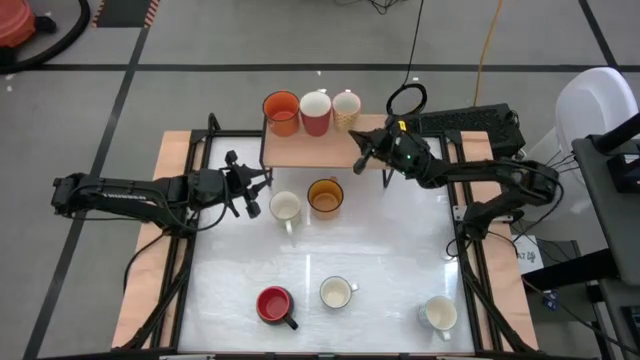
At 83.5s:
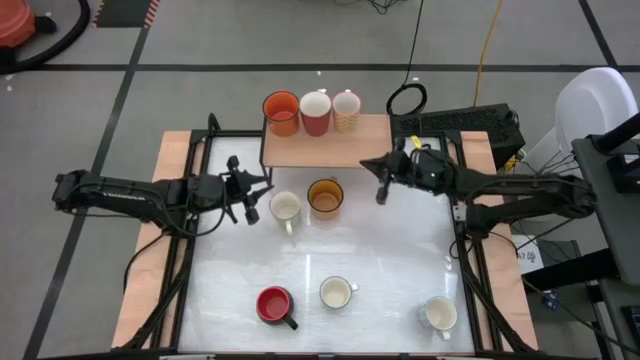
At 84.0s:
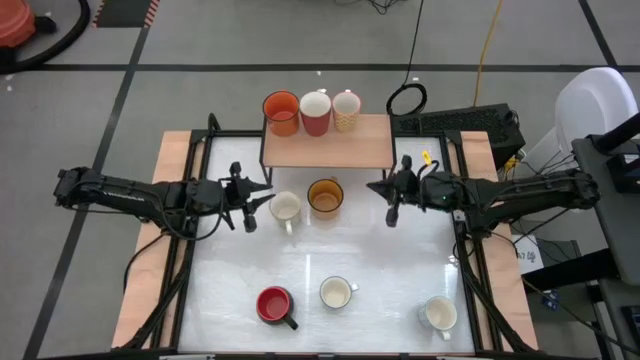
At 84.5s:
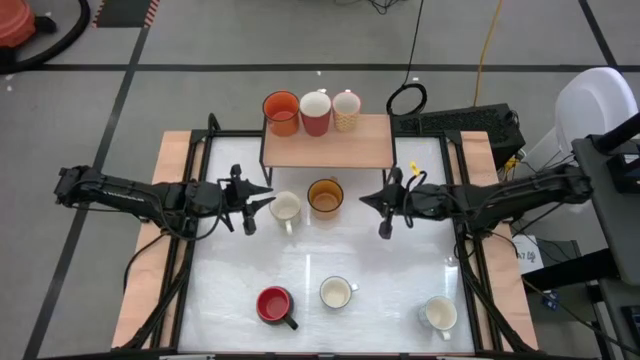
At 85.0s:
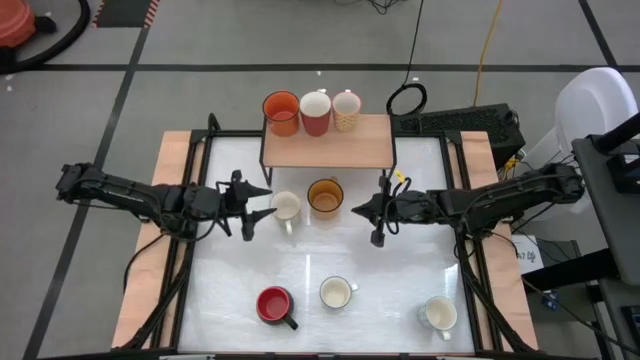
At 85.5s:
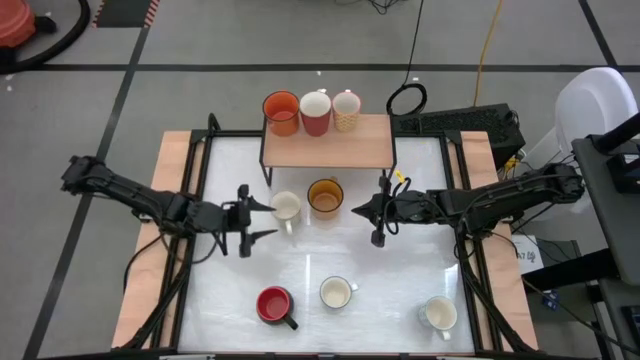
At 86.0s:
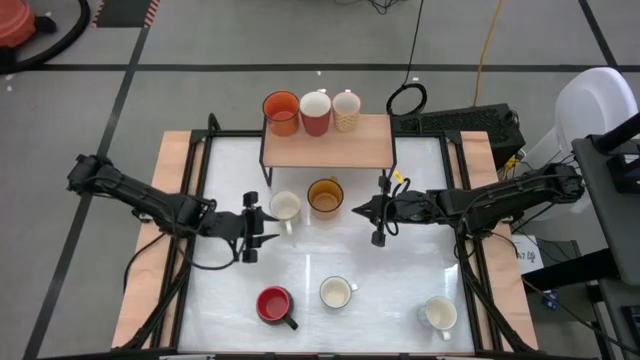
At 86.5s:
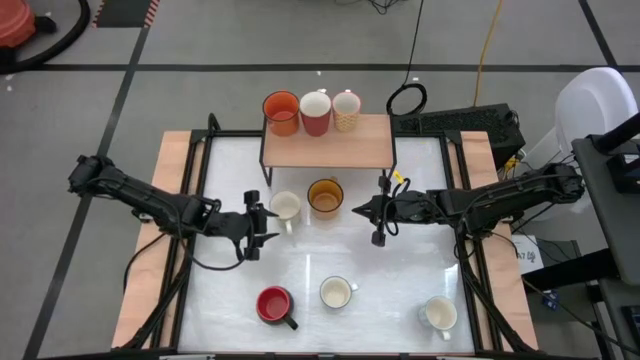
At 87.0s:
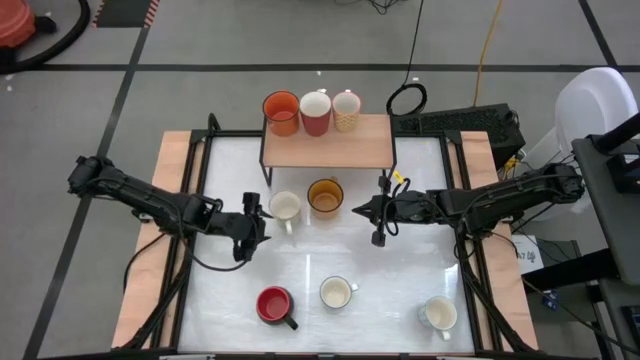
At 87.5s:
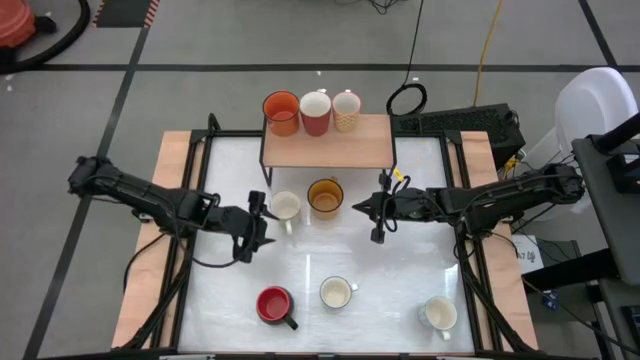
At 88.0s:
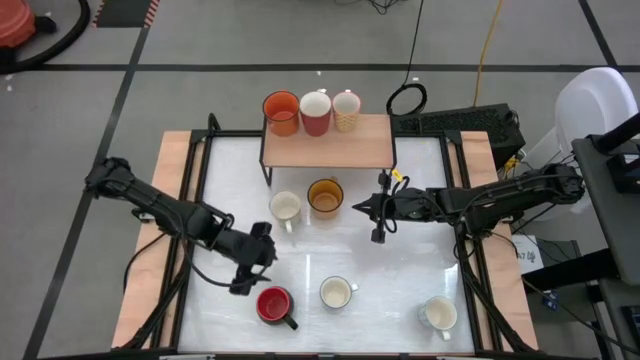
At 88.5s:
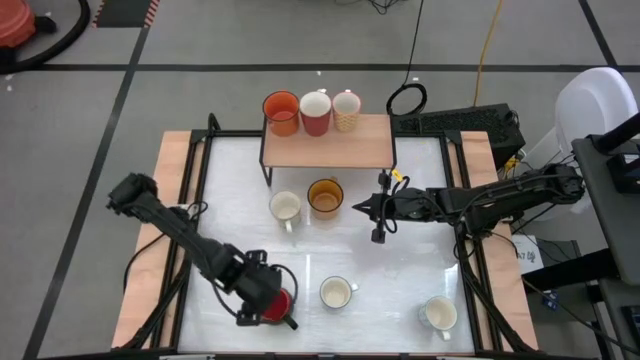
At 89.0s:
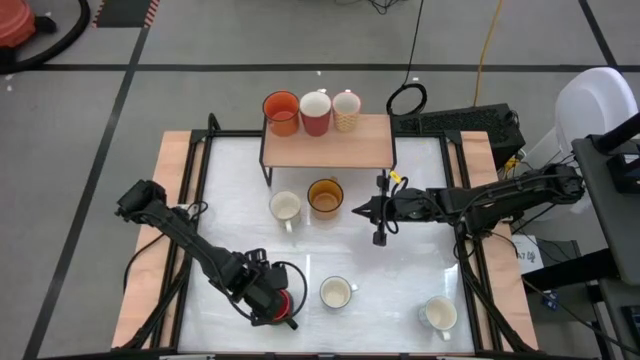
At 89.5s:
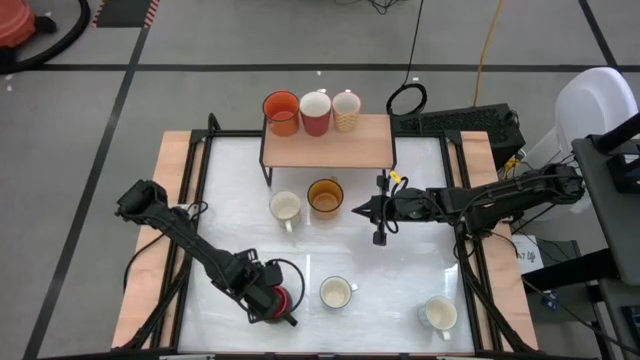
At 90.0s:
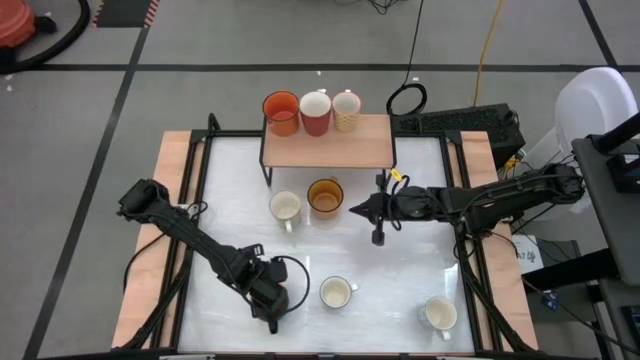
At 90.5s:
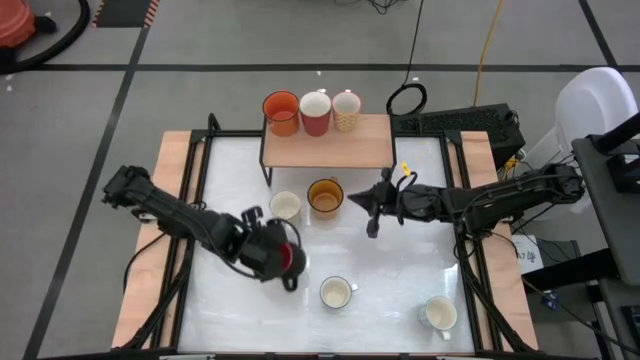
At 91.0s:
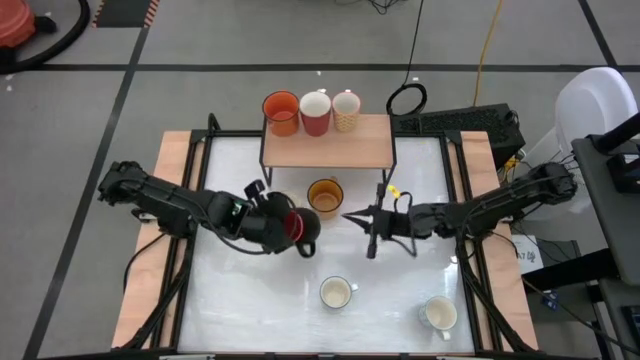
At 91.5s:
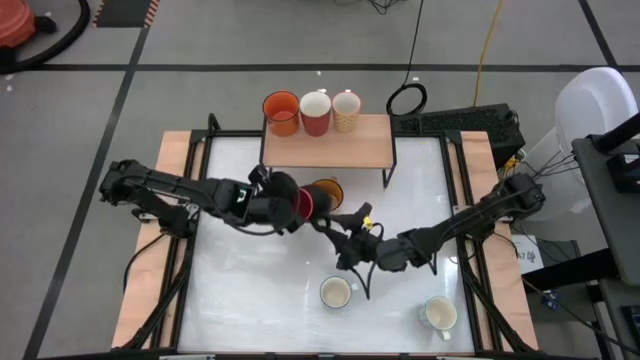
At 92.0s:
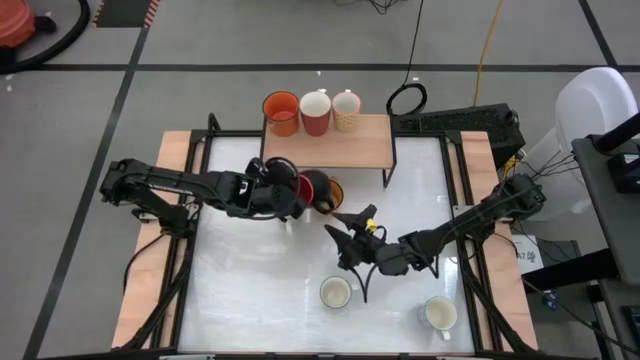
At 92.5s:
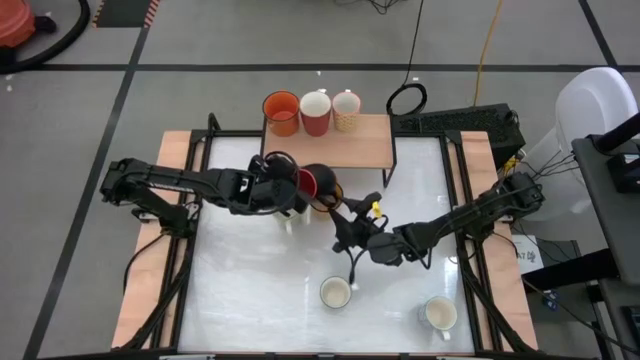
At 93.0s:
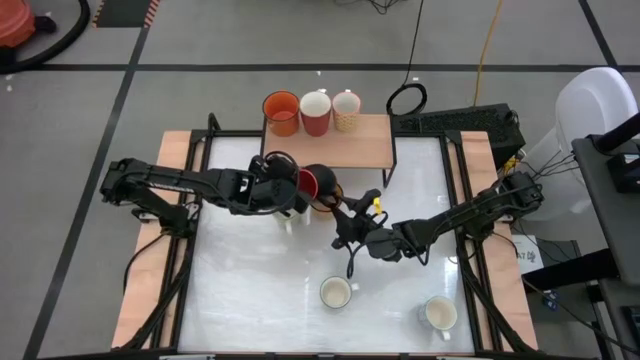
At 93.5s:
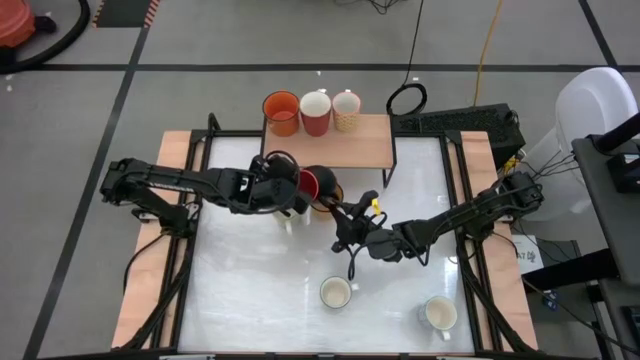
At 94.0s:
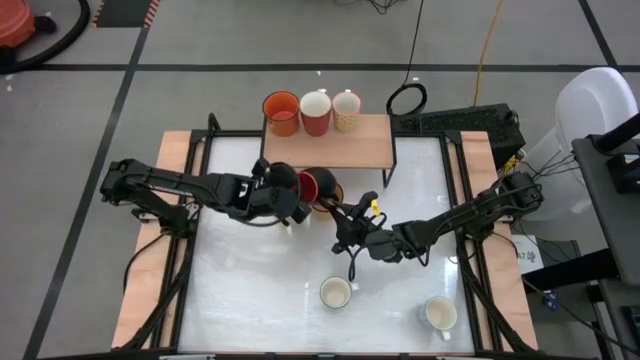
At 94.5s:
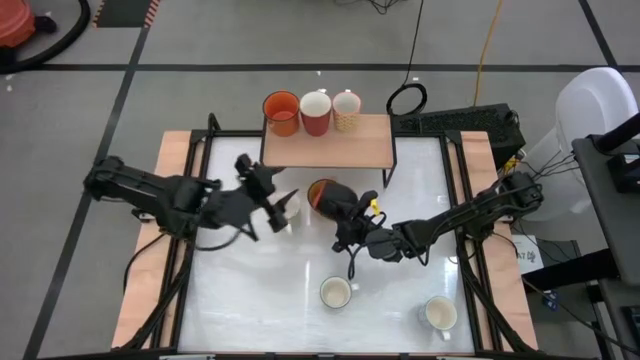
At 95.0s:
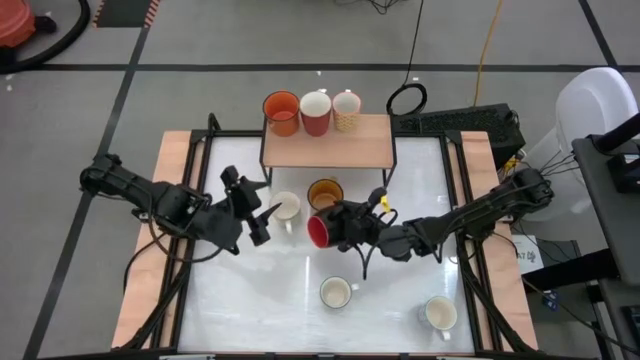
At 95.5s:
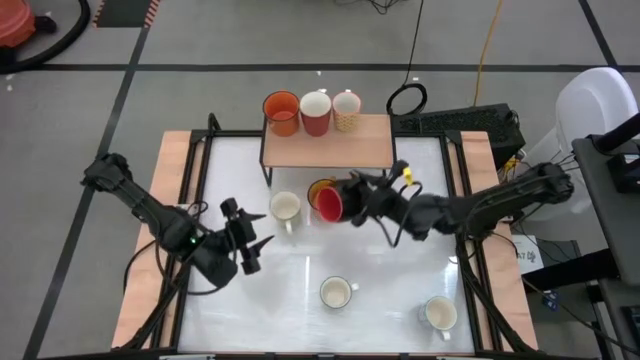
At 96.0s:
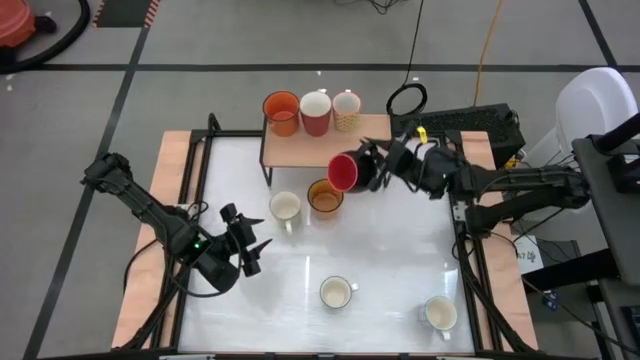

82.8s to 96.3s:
Task: Place coffee mugs
Put the black mug on the shelf

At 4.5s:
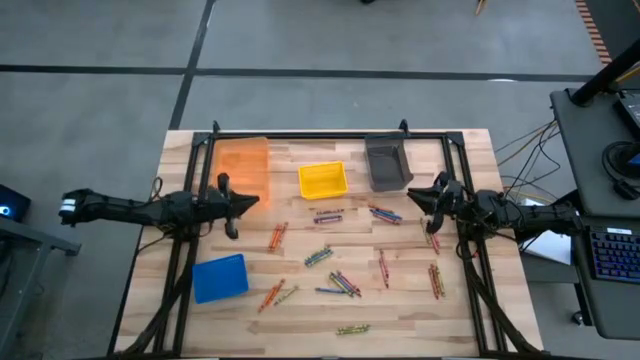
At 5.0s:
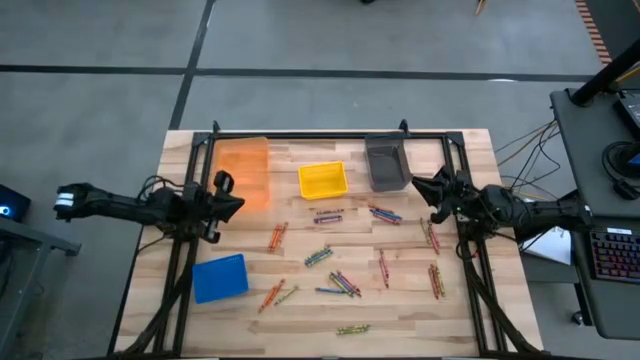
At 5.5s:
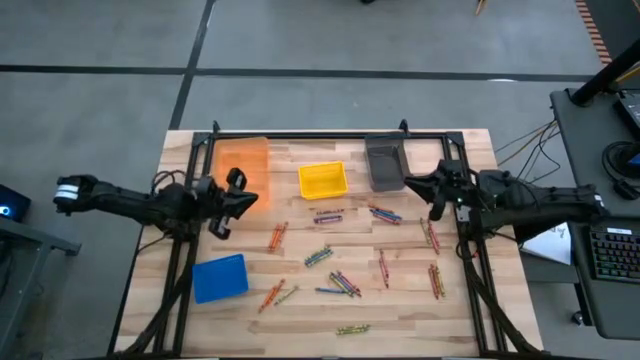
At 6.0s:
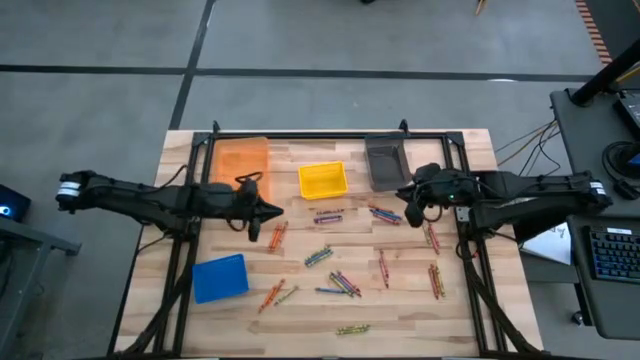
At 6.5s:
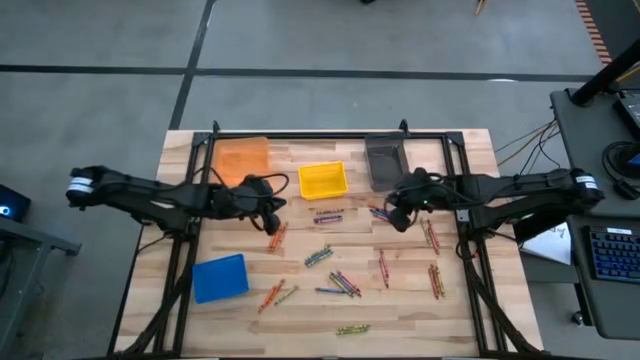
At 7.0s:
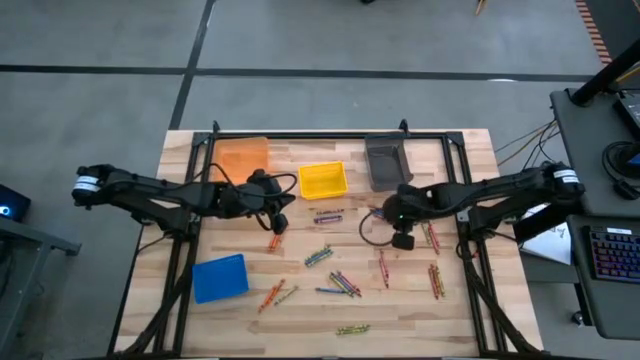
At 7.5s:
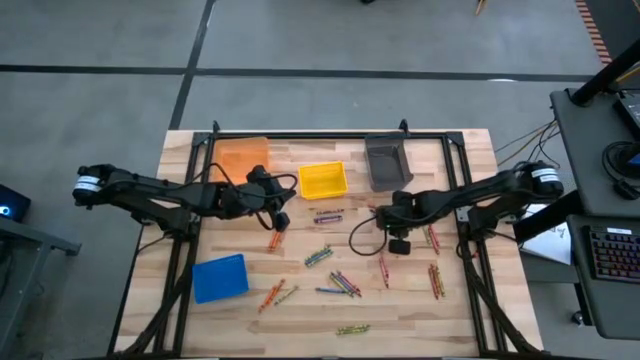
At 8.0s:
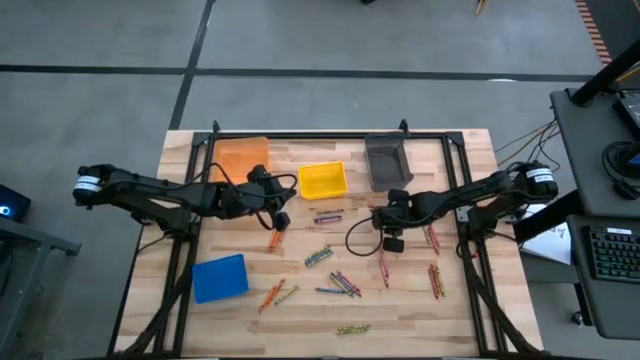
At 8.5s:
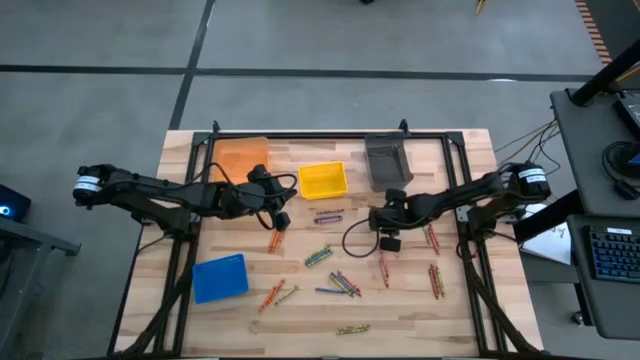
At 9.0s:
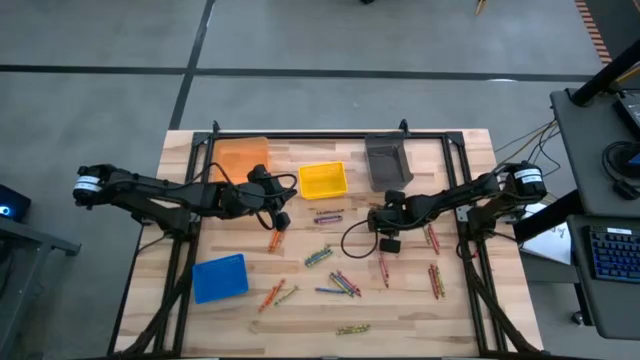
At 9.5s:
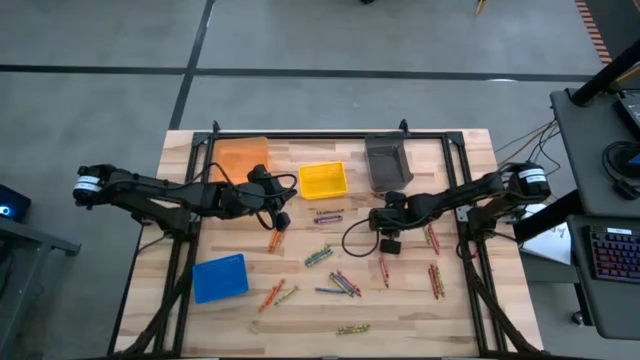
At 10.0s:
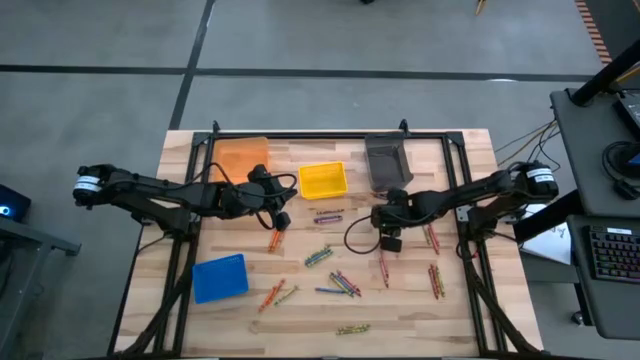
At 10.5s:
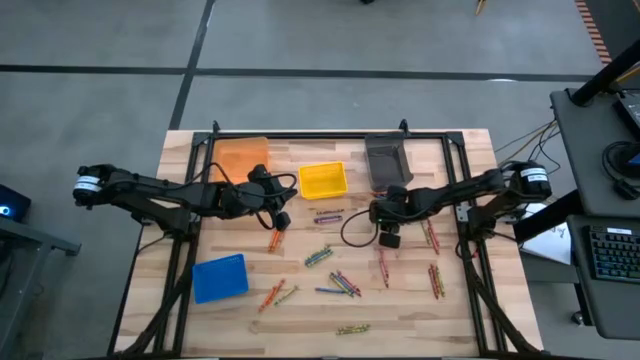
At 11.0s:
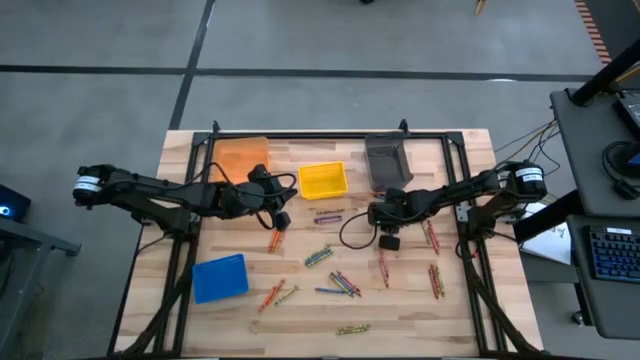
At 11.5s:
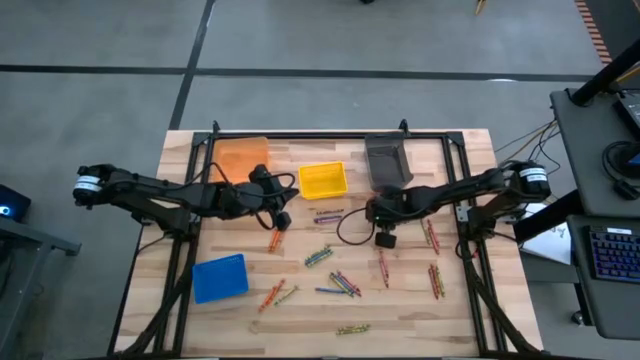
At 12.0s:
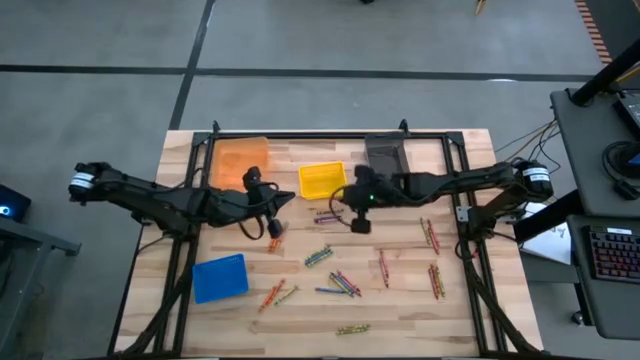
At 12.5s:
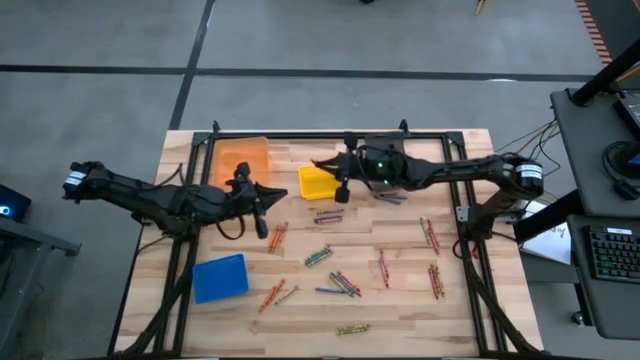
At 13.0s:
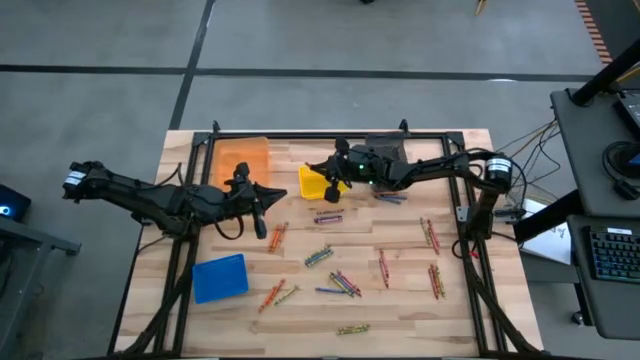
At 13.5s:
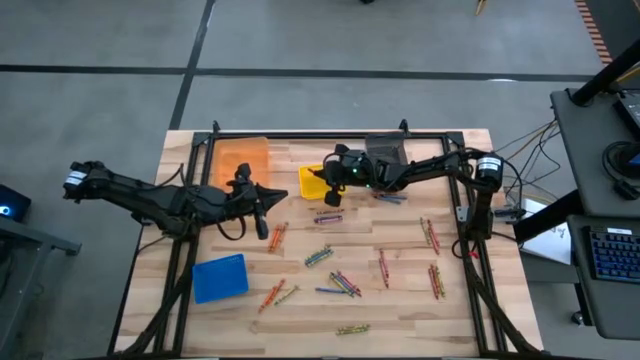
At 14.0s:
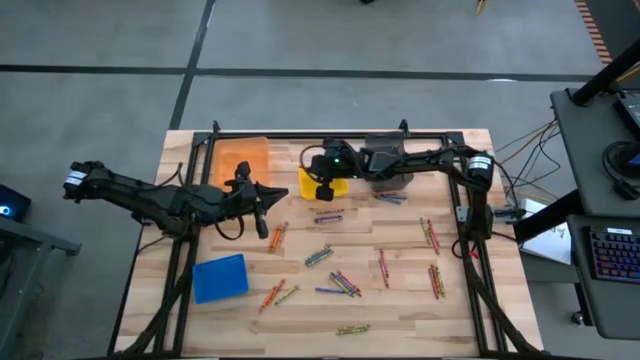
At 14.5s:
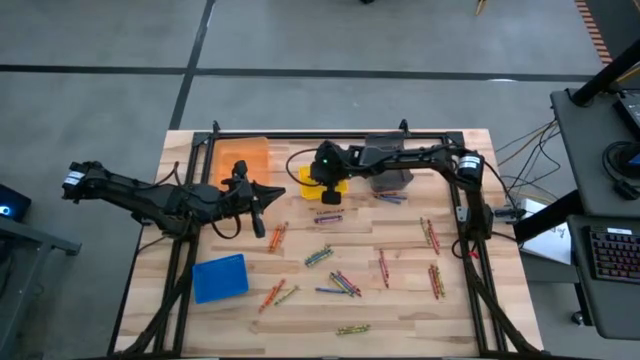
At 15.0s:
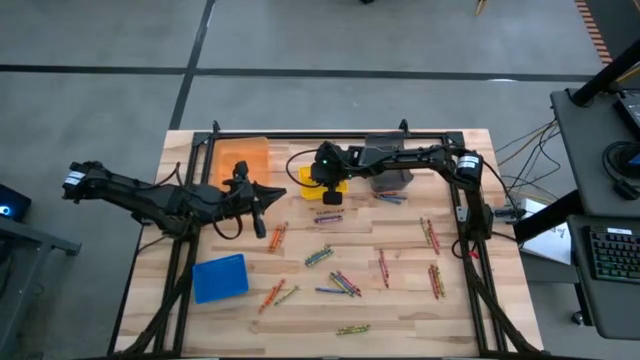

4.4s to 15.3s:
Task: Sort crayons
Put the red crayon into the yellow bin
